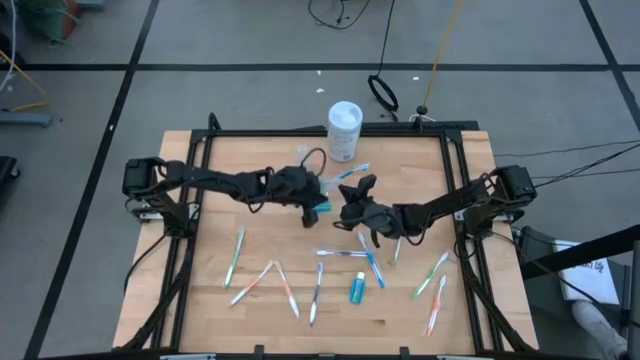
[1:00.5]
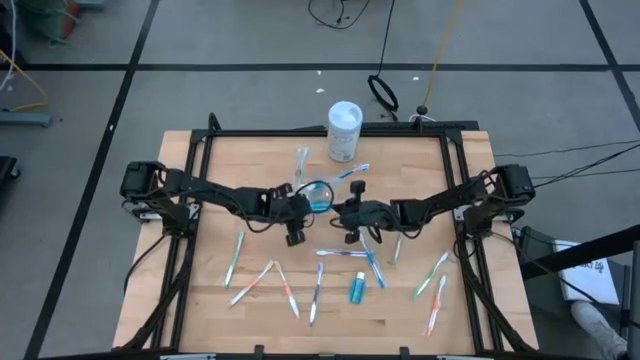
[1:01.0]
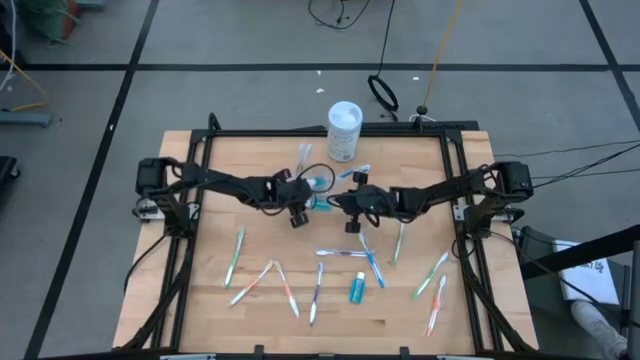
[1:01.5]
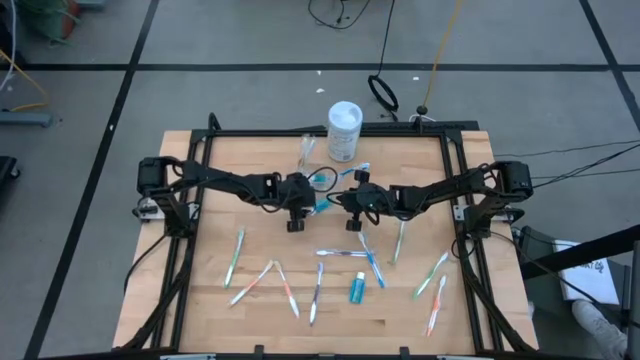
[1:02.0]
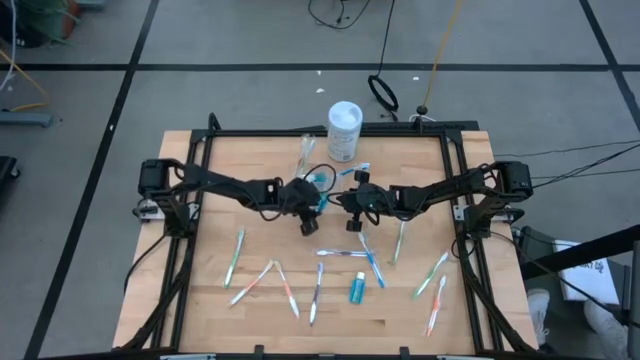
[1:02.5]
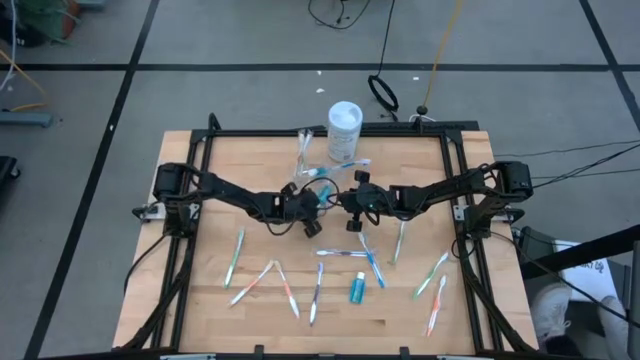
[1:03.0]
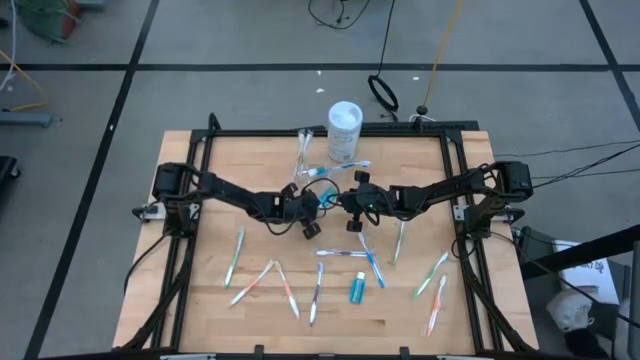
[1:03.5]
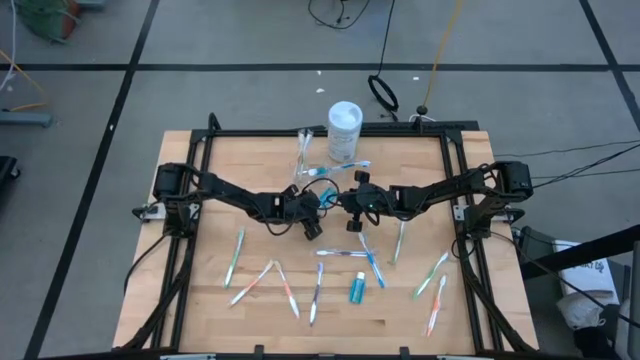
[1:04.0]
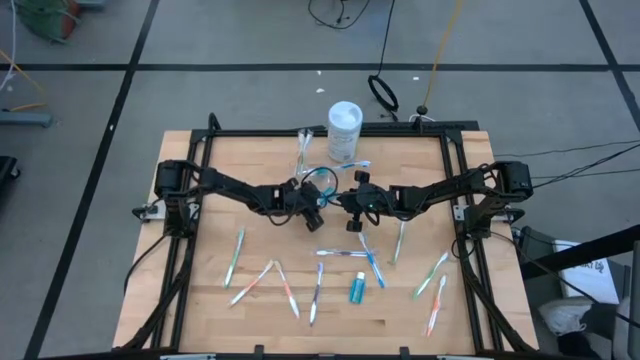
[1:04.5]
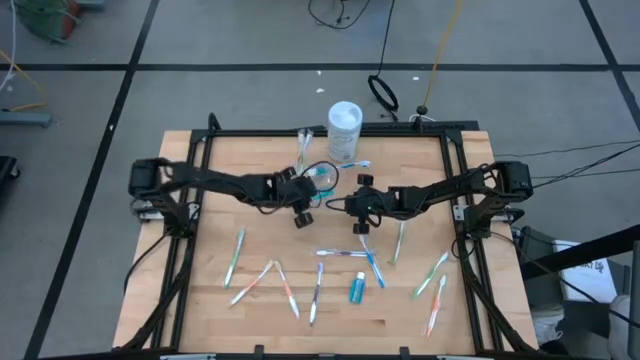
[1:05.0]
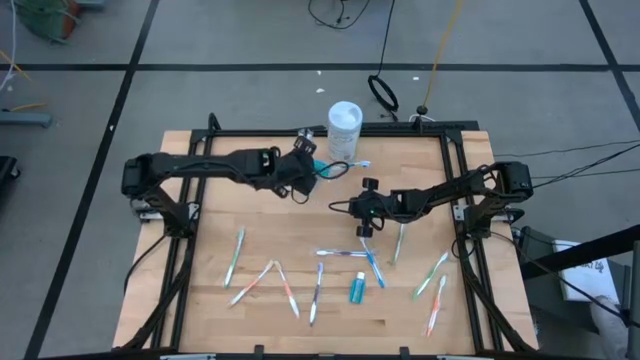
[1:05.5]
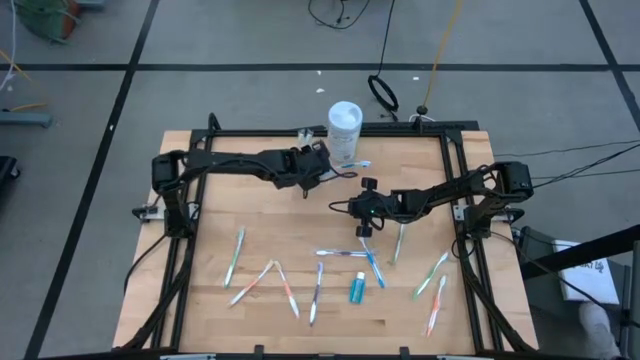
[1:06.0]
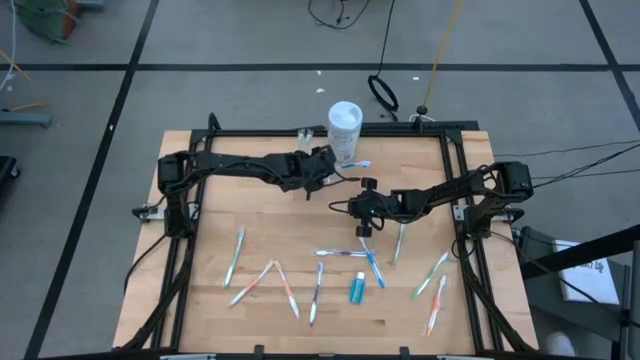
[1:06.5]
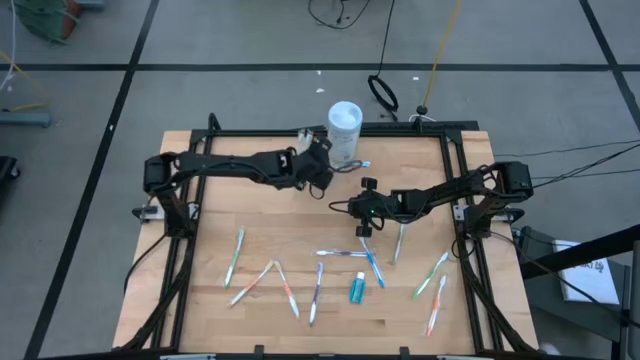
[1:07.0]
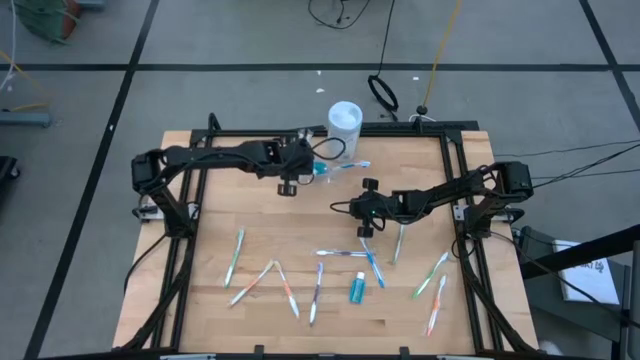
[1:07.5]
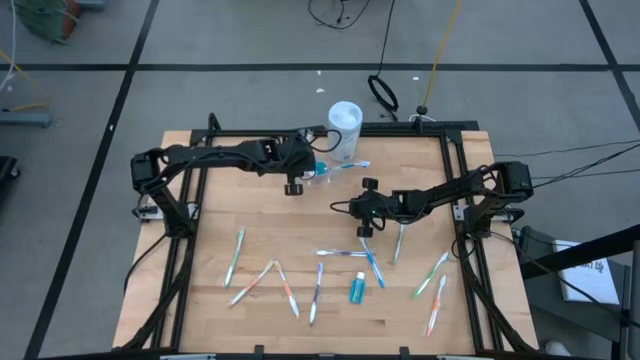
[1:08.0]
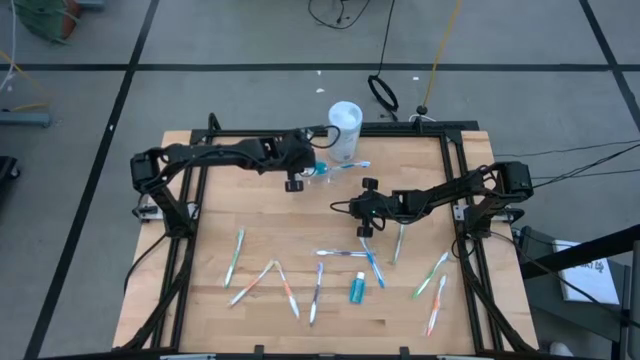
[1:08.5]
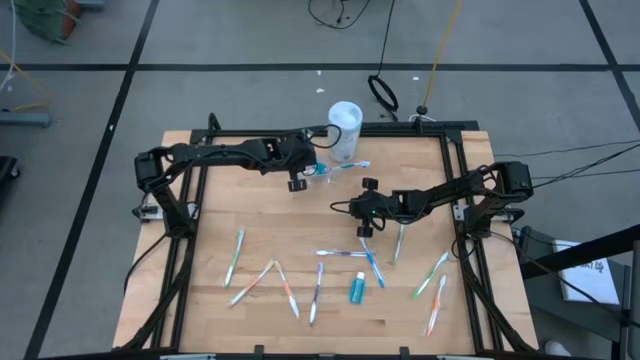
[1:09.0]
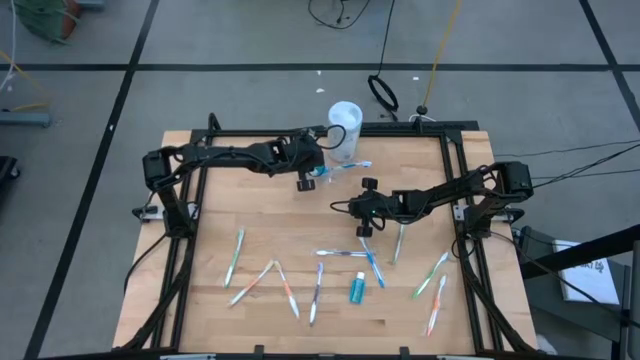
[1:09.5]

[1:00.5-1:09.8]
Task: Pick & Place toothbrushing station
Put the blue mouthwash into the transparent organizer

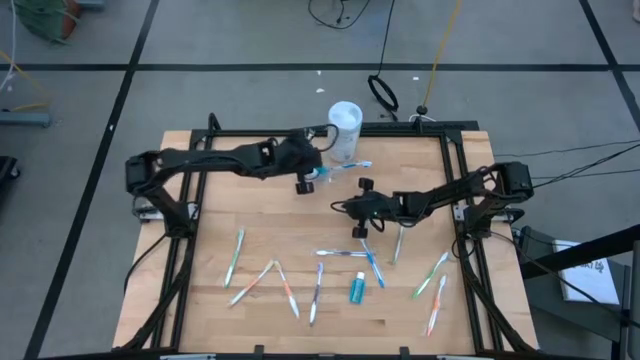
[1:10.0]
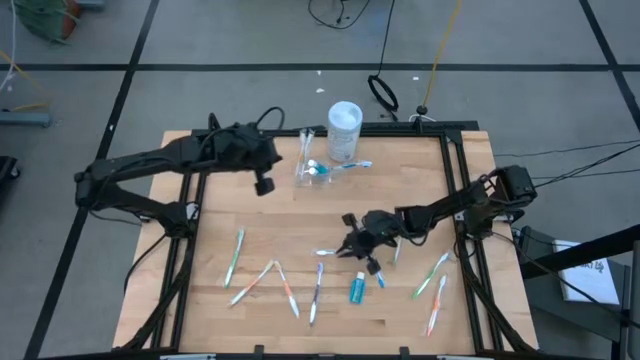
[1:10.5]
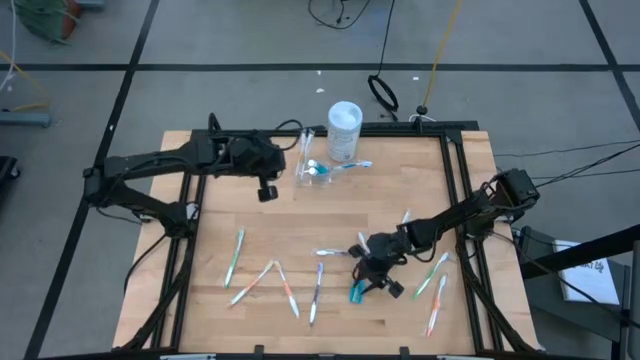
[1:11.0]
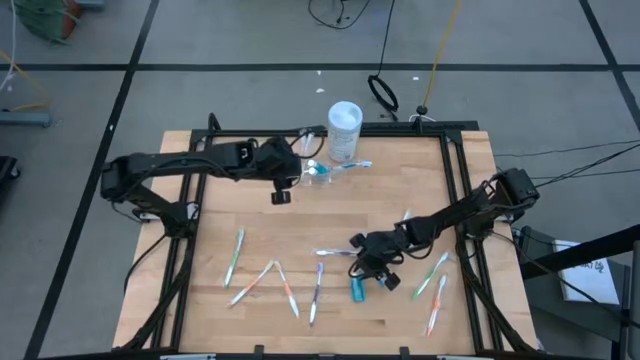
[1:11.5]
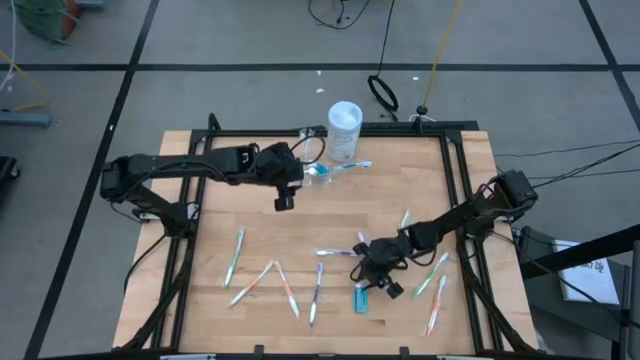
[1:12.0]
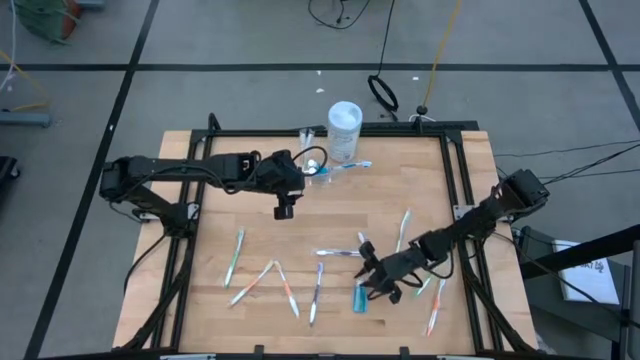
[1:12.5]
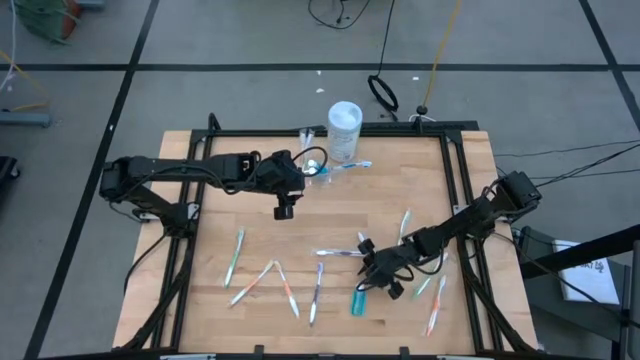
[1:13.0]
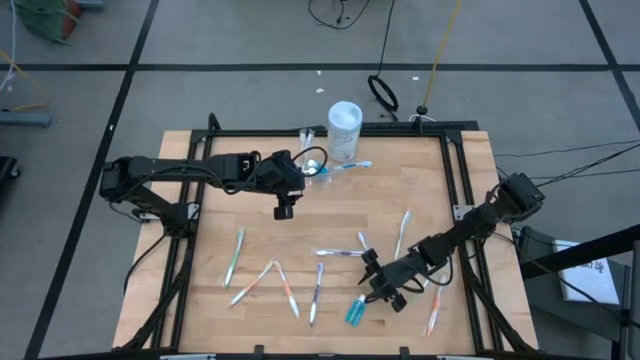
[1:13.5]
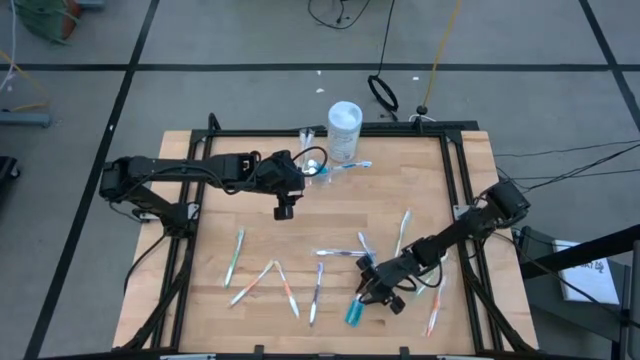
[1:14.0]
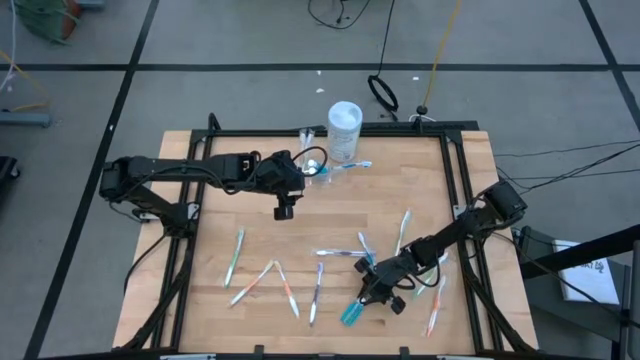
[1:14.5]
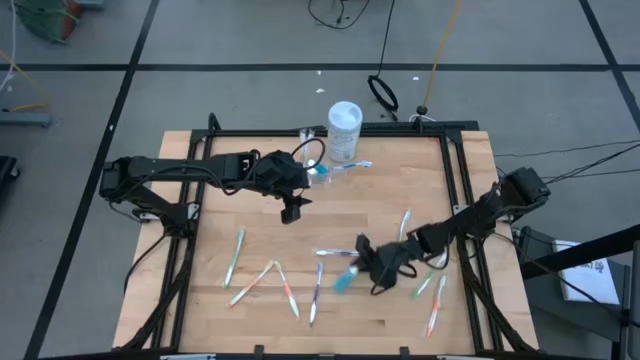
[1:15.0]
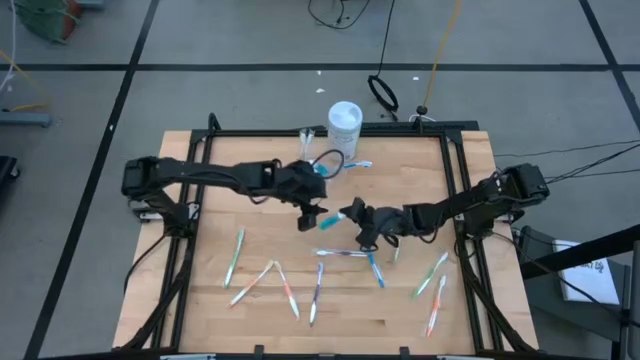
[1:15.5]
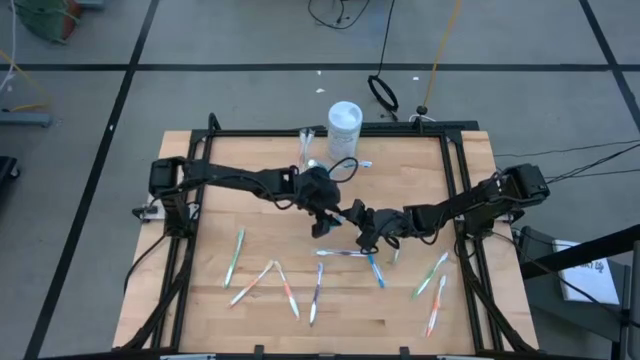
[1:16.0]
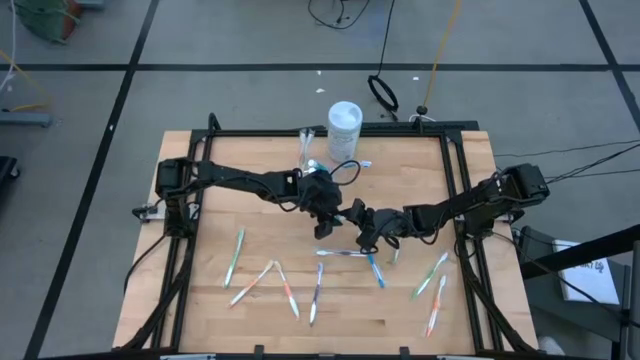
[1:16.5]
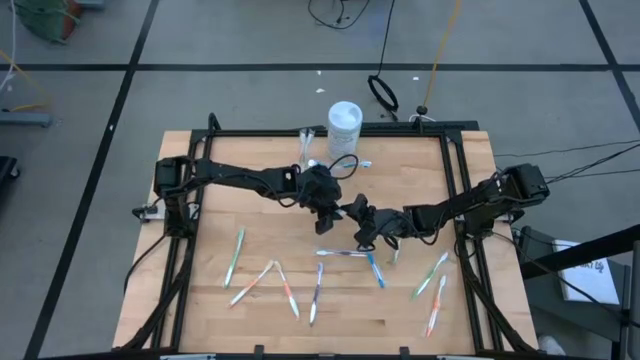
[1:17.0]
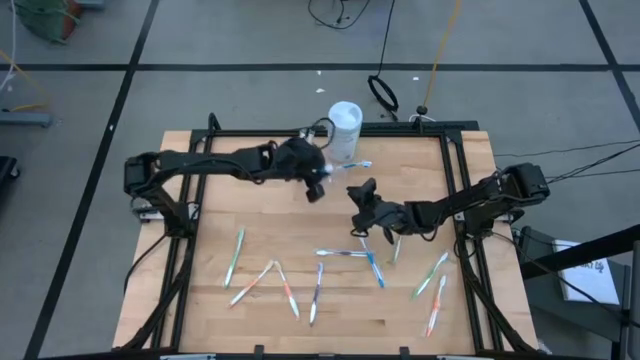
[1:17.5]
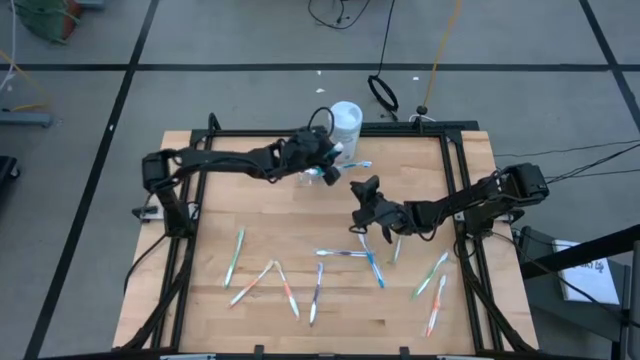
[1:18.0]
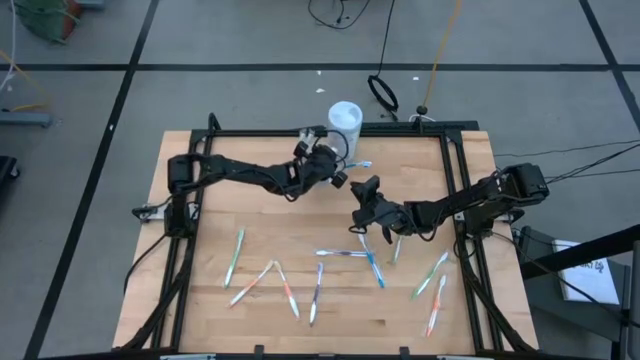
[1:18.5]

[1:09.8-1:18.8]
Put the blue mouthwash into the transparent organizer

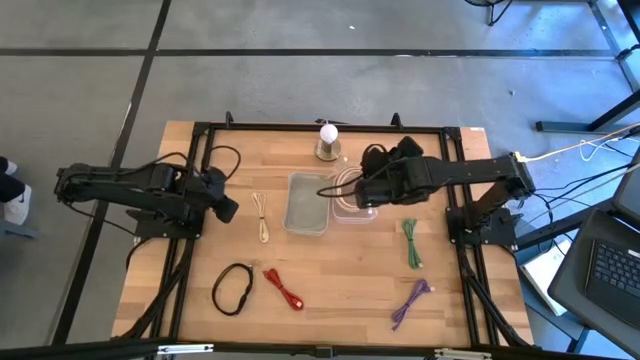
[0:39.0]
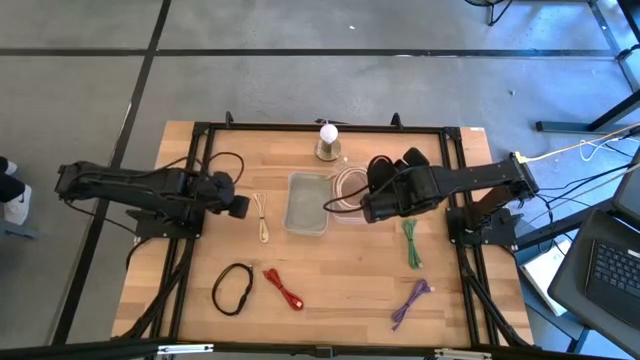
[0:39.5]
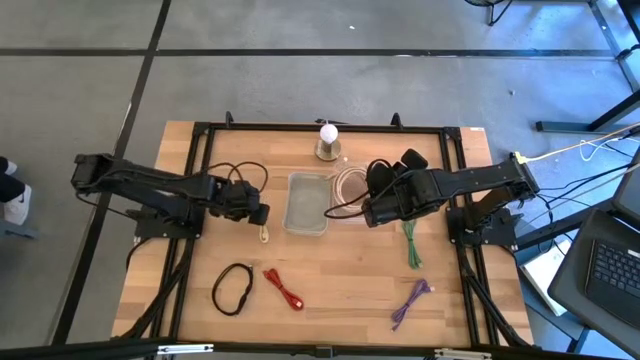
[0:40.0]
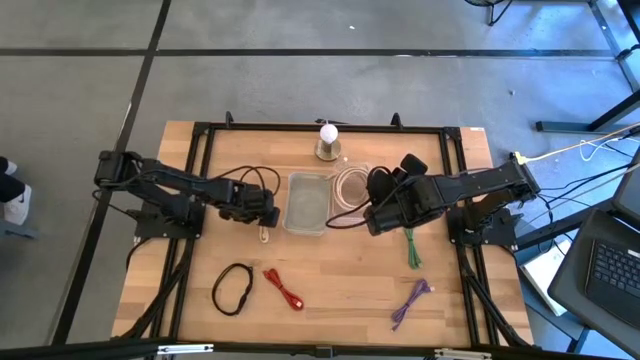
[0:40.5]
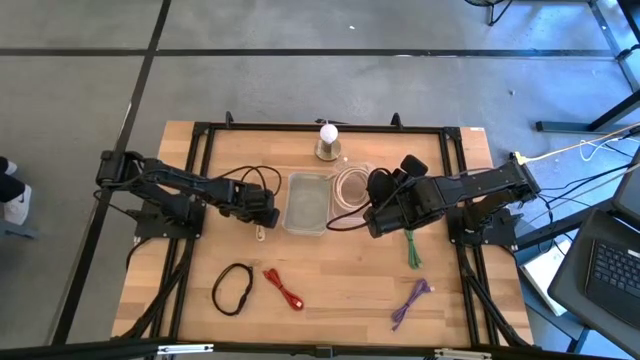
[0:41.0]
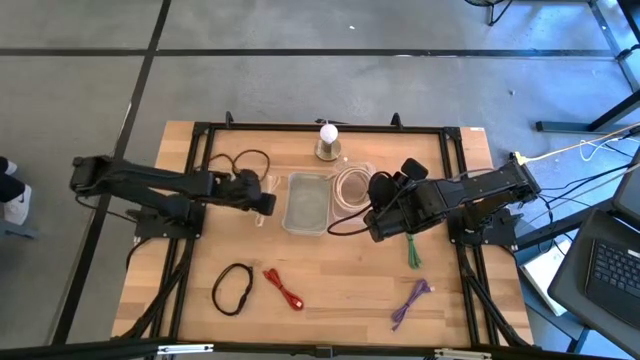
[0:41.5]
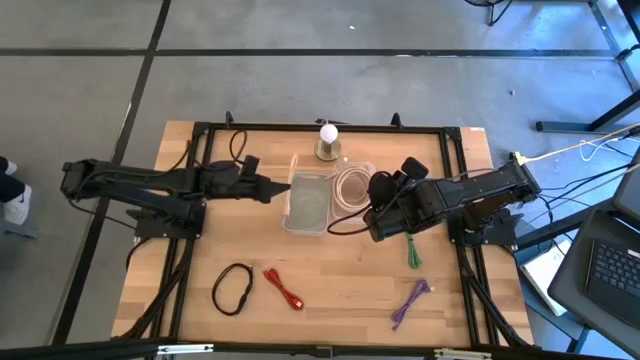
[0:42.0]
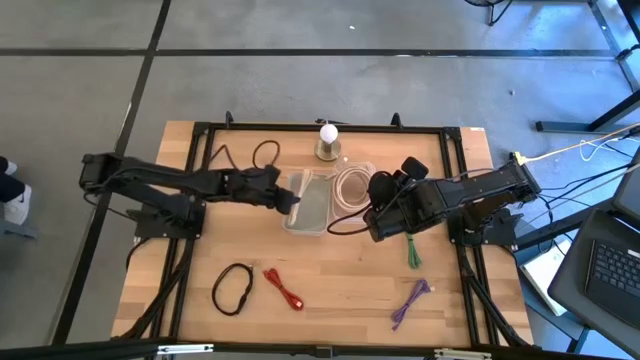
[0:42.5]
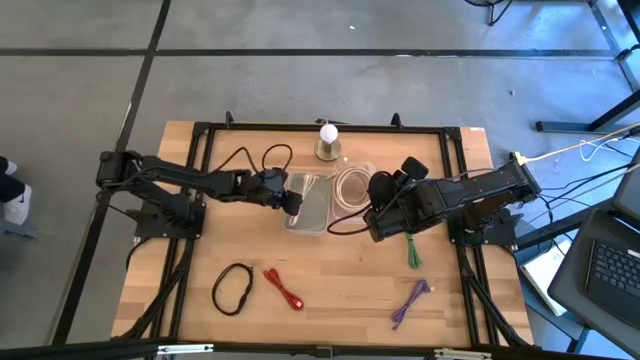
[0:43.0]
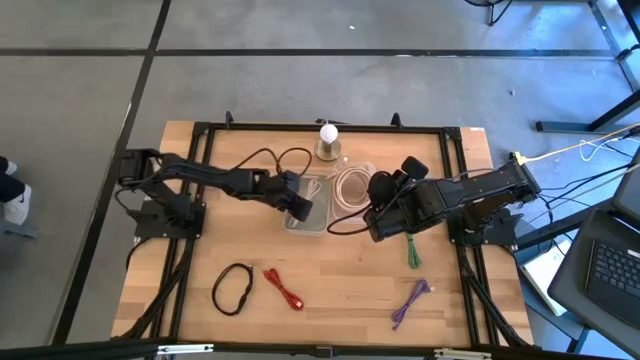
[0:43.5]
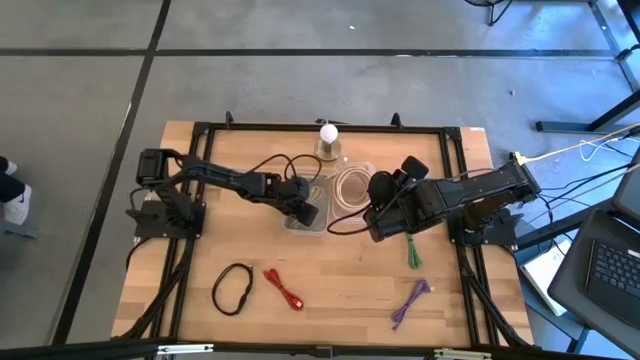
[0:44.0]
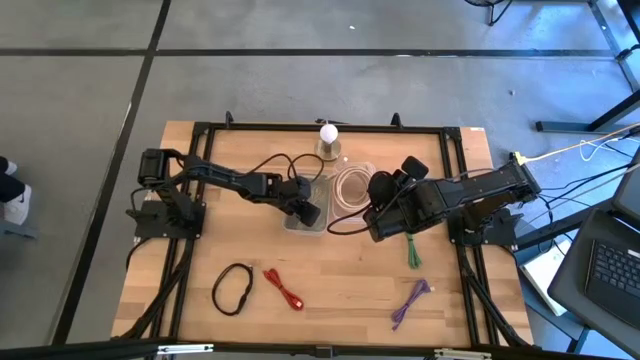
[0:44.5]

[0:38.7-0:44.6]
Task: Pick and place USB-C Cables
Put the white charger cable into the gray bin
